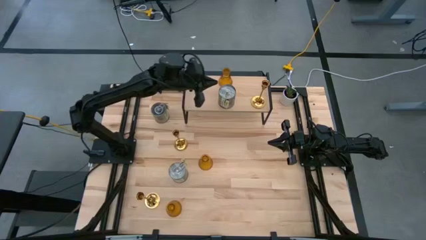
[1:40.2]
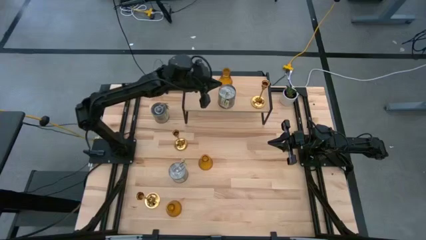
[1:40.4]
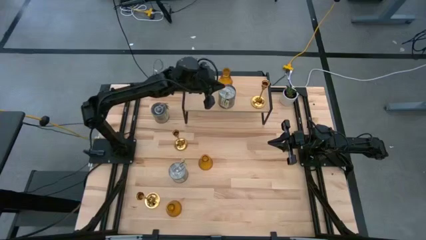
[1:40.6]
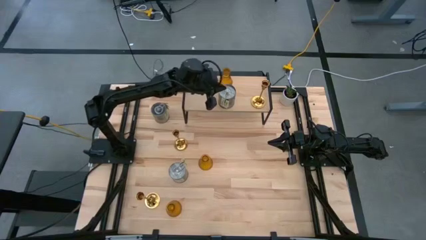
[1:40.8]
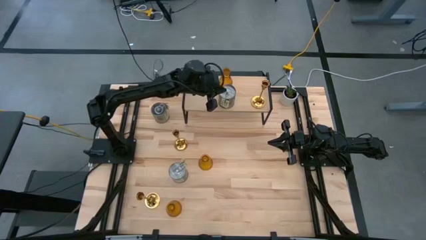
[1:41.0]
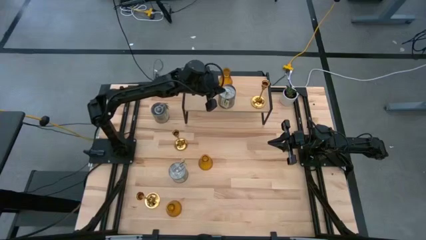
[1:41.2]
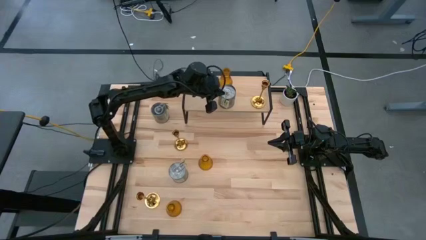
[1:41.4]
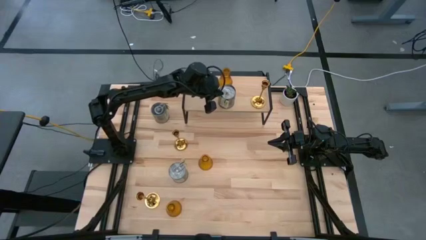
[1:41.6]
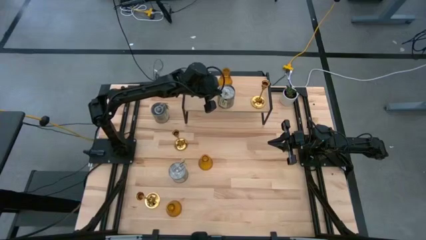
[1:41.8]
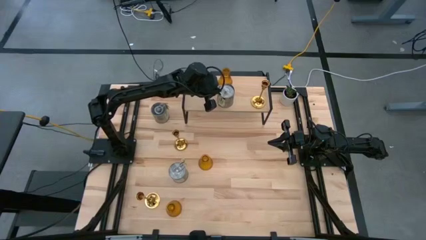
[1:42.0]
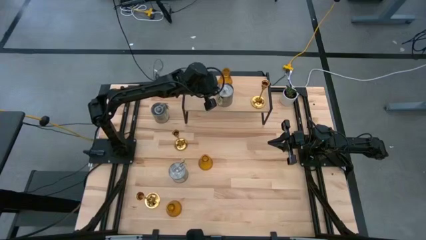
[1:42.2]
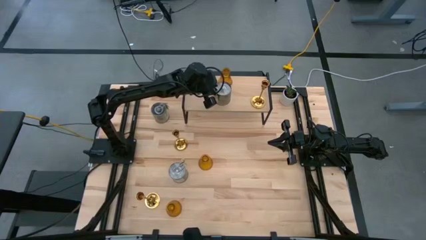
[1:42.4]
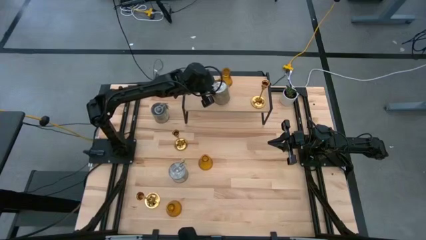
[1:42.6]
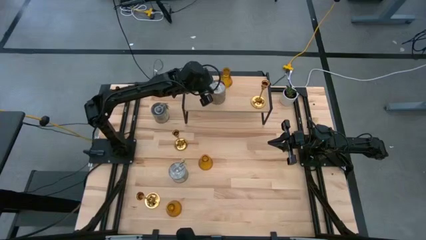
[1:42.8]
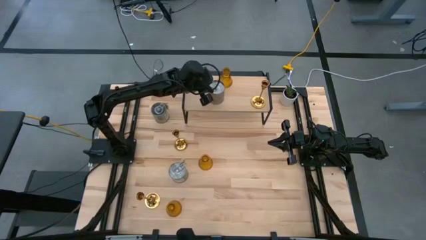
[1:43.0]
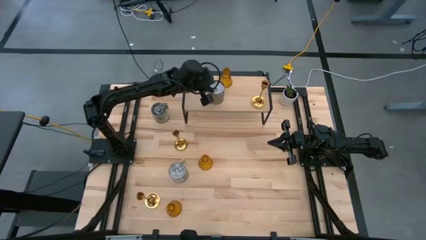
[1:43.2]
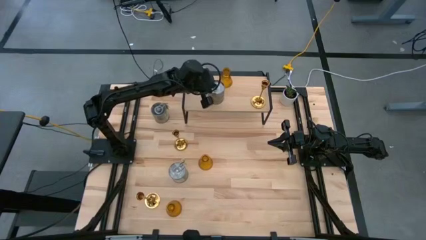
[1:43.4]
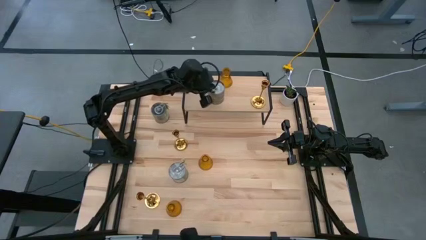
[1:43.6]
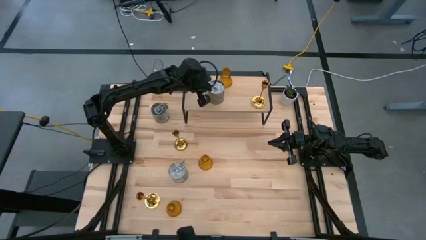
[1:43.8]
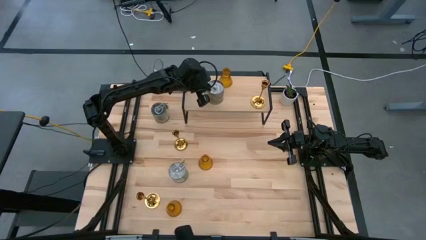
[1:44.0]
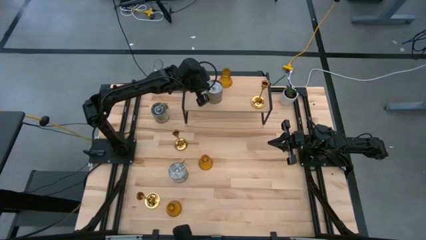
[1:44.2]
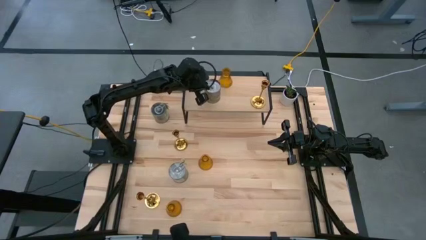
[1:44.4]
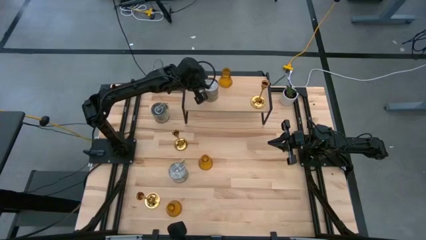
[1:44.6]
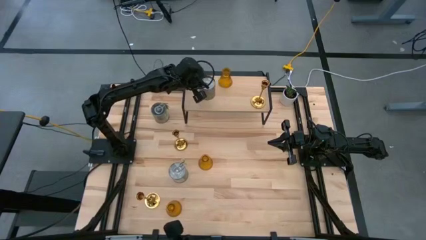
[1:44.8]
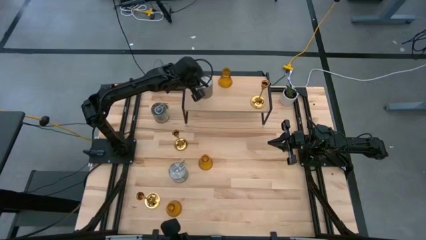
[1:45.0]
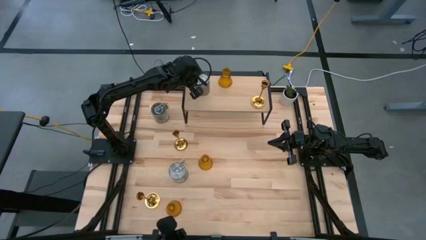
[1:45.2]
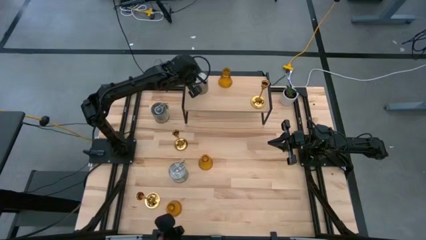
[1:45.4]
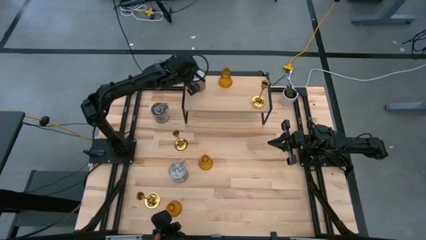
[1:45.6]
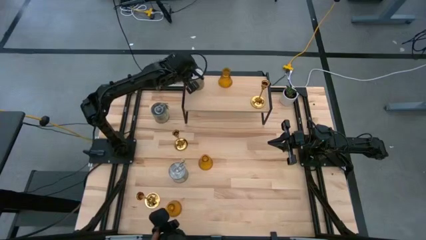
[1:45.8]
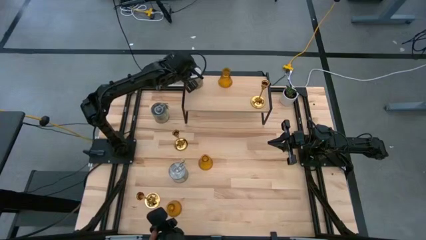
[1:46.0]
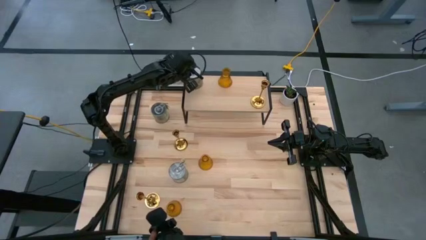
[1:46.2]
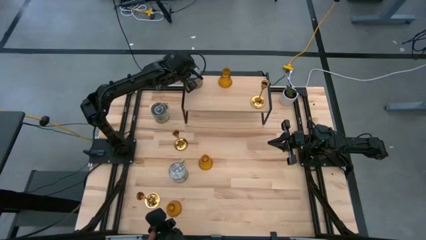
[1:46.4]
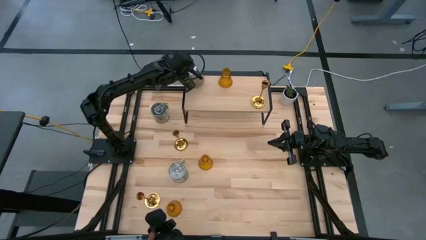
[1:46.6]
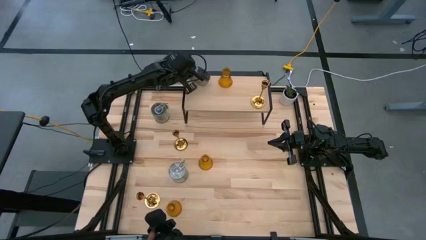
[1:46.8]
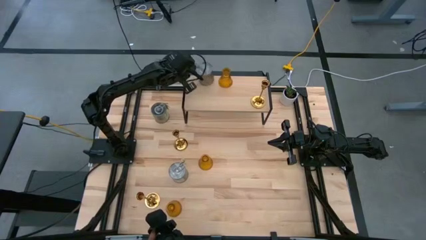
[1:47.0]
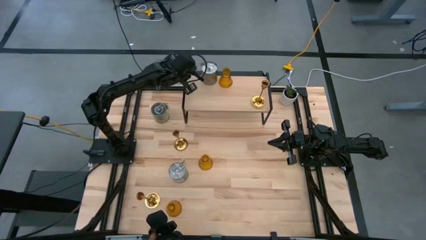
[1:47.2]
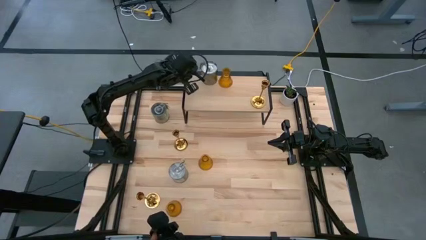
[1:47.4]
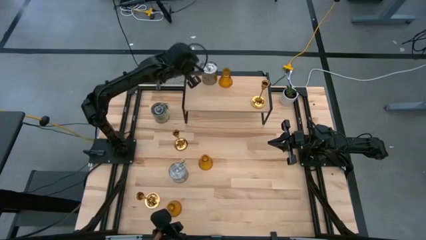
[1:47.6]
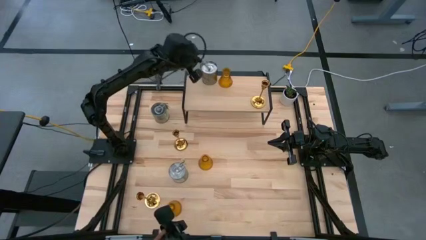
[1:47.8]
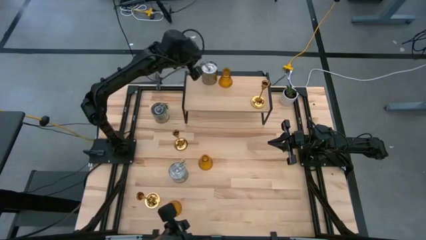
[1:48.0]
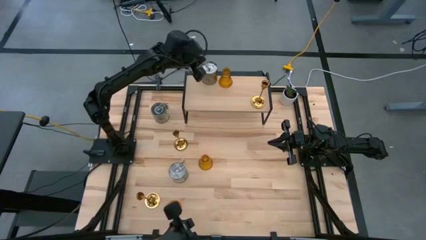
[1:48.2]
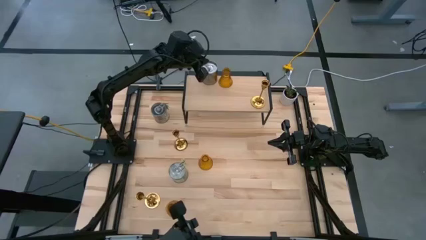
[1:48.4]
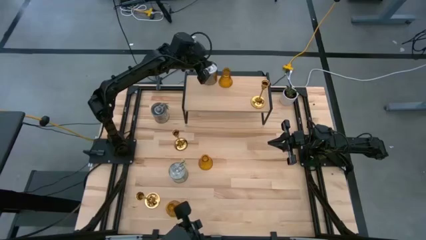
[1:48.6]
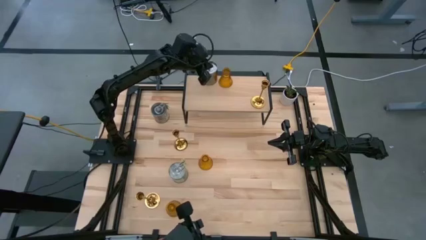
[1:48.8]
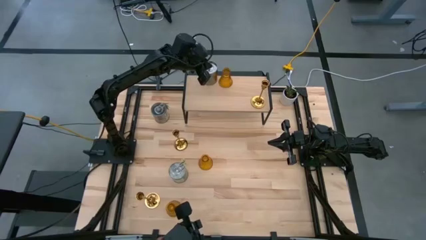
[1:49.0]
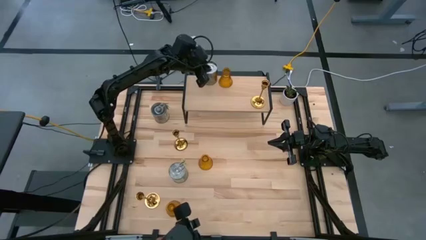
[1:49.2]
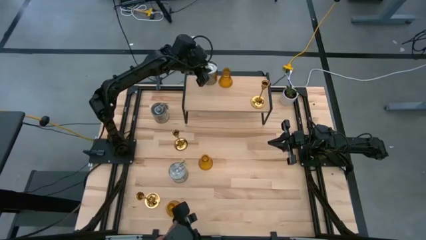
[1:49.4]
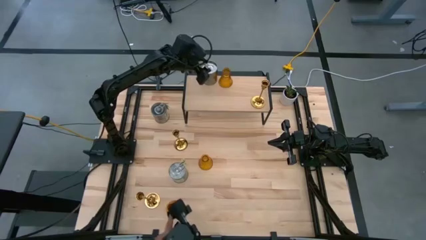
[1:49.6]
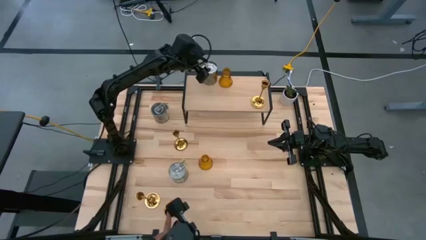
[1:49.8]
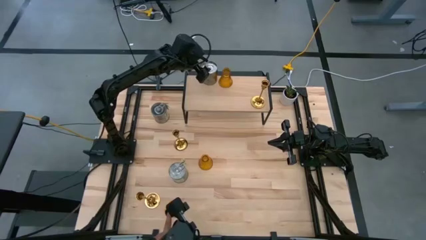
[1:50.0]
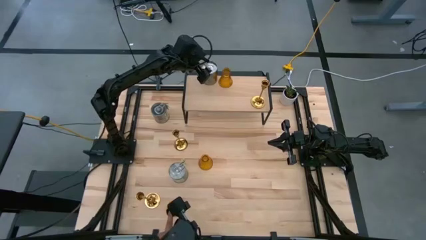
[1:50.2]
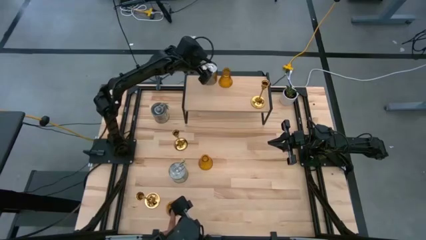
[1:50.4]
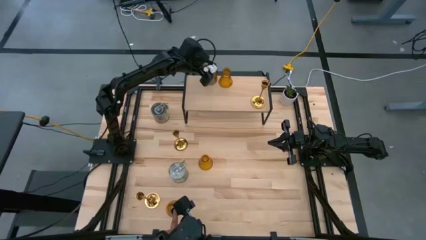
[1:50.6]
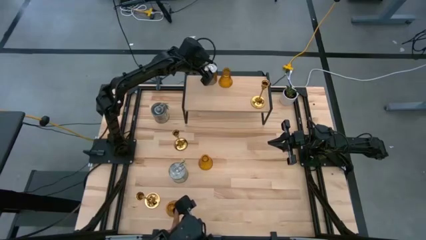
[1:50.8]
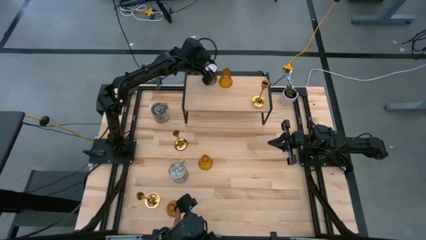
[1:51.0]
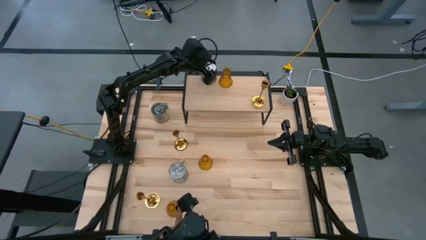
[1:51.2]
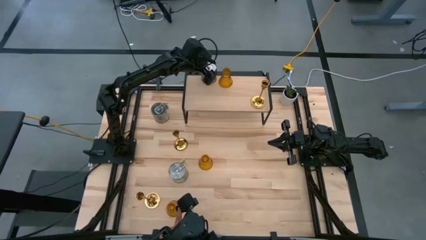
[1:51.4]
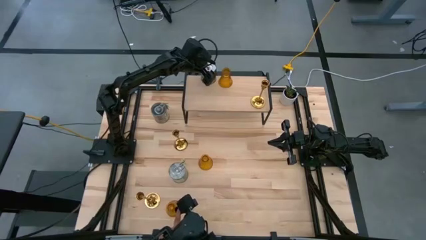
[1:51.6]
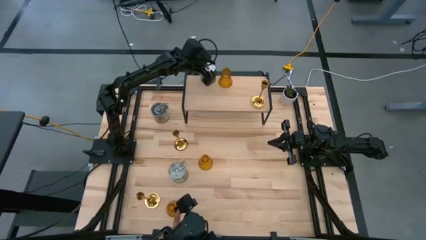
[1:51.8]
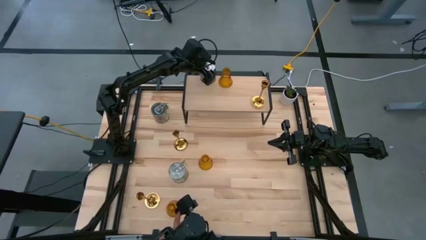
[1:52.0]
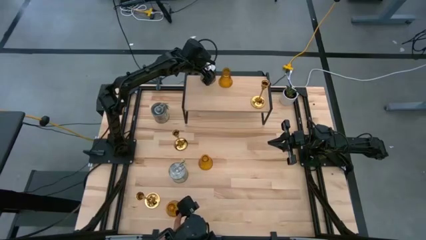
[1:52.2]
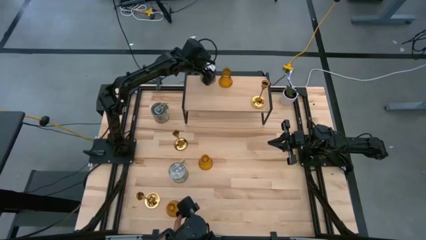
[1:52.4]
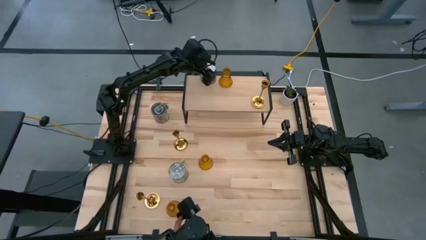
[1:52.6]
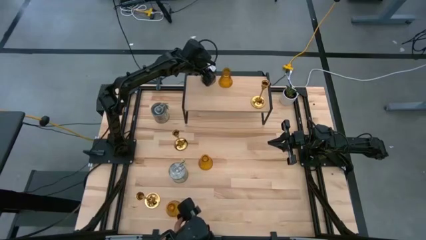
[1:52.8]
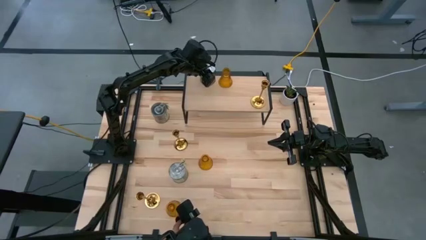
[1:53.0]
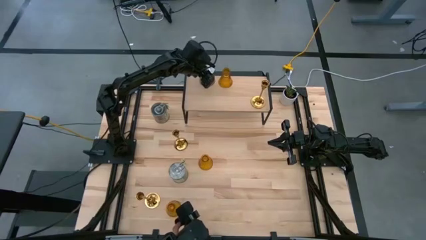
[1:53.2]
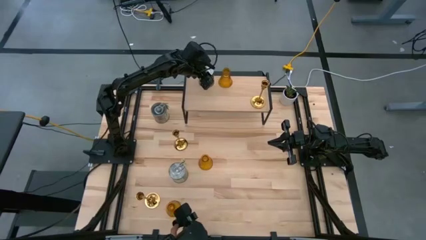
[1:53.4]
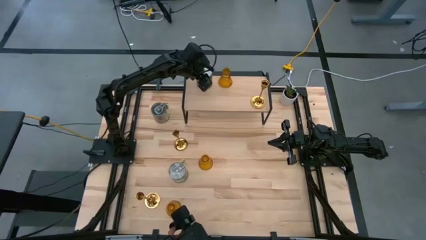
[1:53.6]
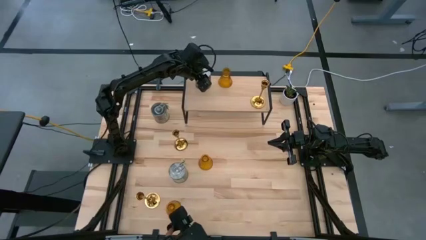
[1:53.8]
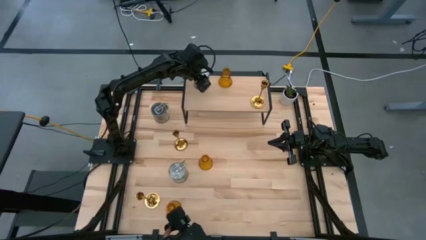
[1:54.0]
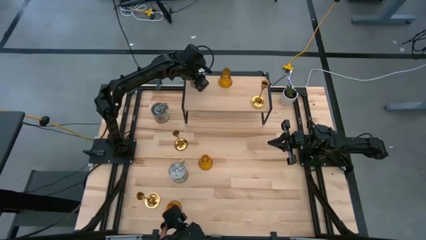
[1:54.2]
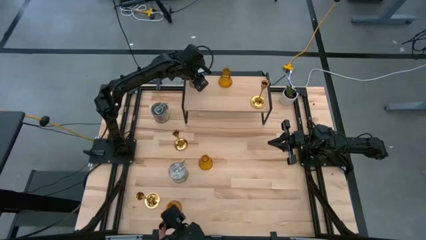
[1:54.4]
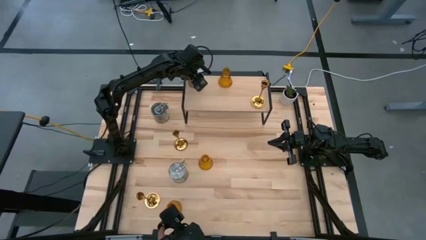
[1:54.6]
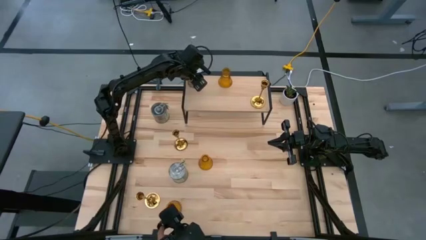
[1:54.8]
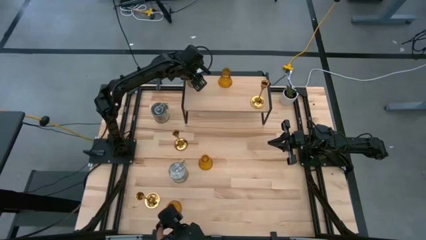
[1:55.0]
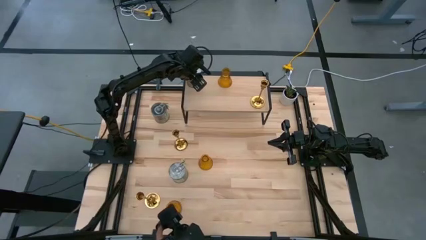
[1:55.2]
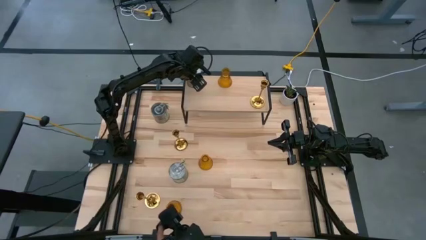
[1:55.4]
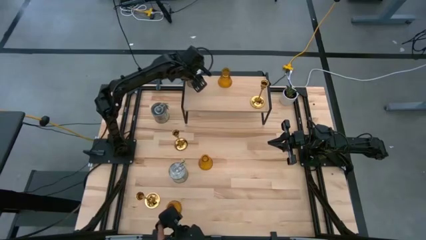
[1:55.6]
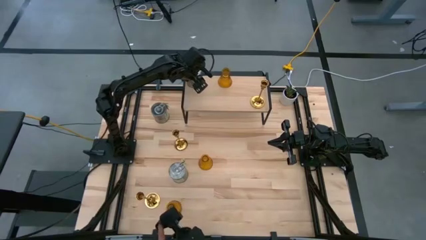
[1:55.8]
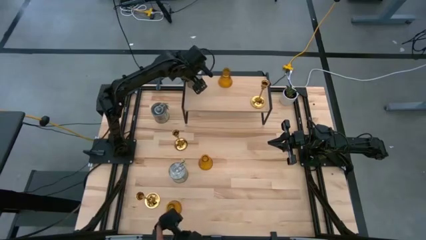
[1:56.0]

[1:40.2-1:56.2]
Task: Pick & Place candle stick holders
Adjust the scented candle on the shelf
